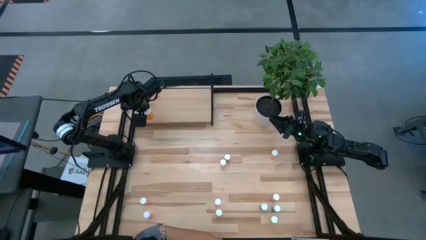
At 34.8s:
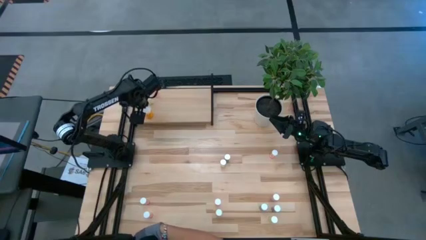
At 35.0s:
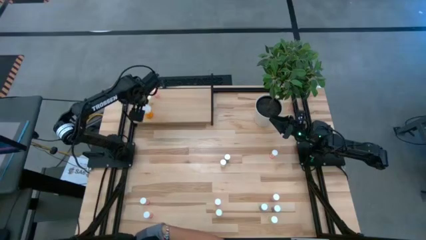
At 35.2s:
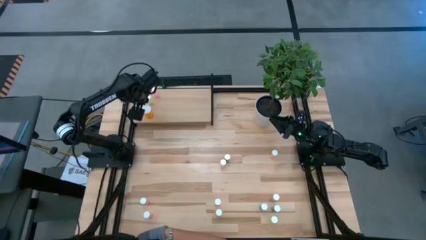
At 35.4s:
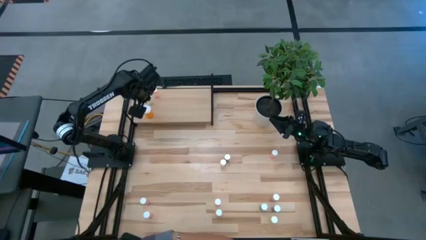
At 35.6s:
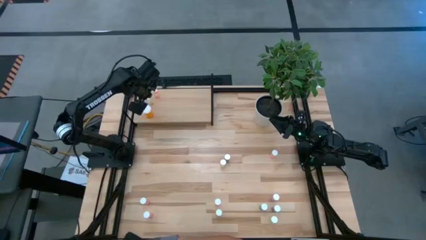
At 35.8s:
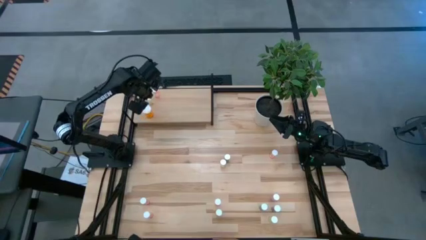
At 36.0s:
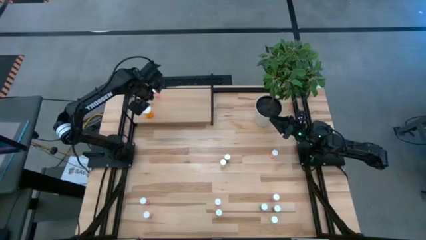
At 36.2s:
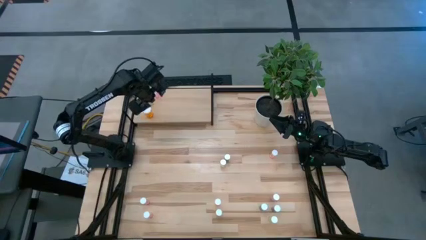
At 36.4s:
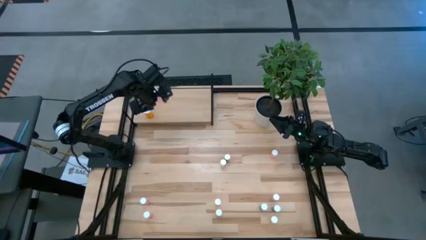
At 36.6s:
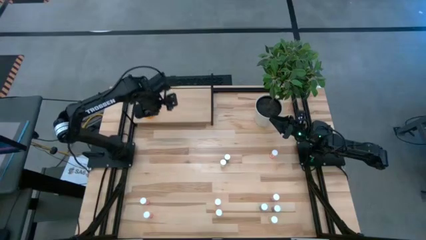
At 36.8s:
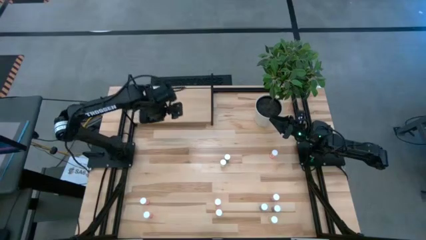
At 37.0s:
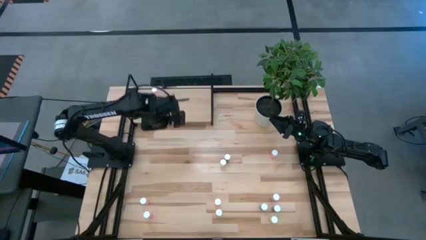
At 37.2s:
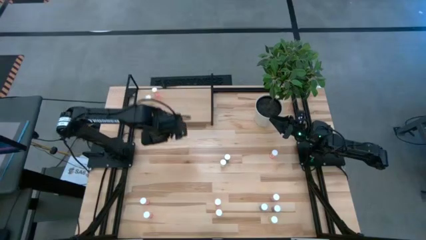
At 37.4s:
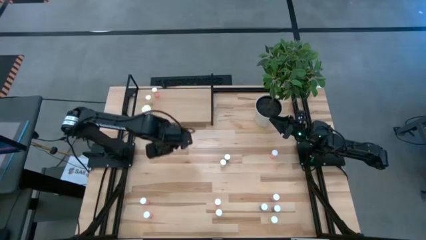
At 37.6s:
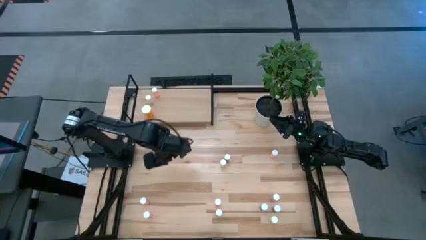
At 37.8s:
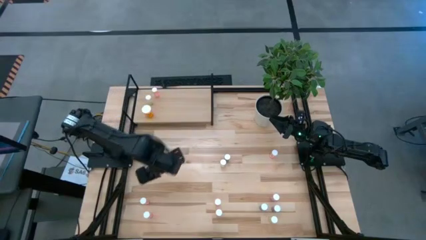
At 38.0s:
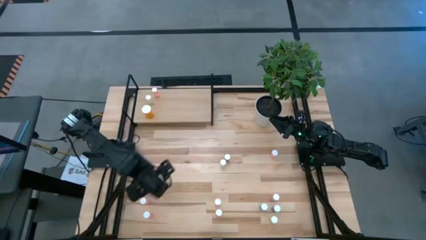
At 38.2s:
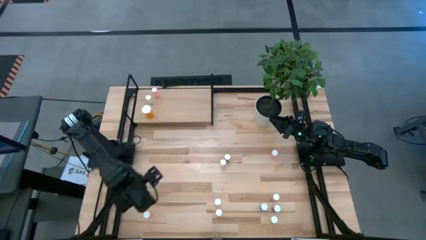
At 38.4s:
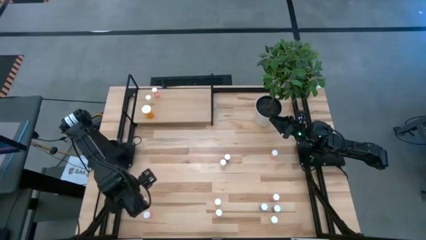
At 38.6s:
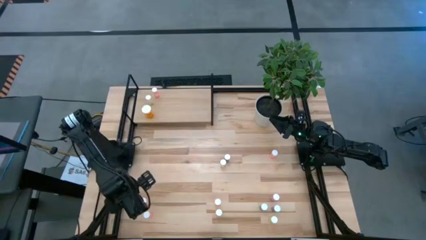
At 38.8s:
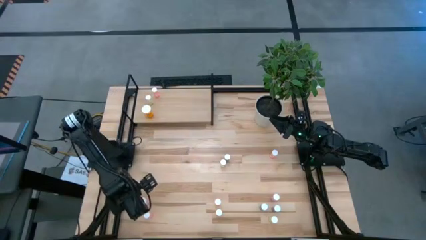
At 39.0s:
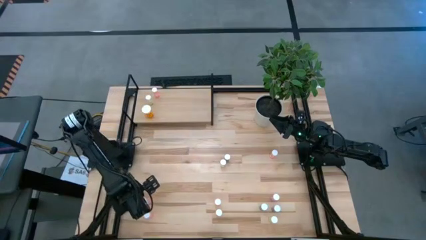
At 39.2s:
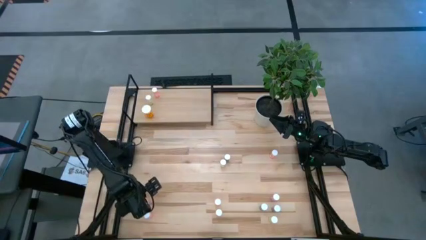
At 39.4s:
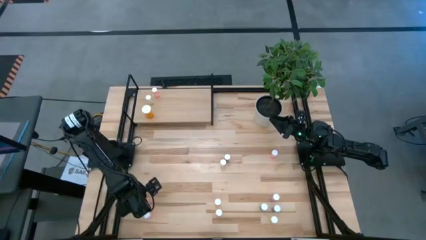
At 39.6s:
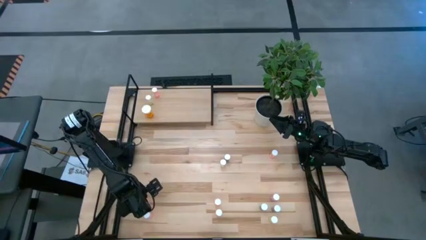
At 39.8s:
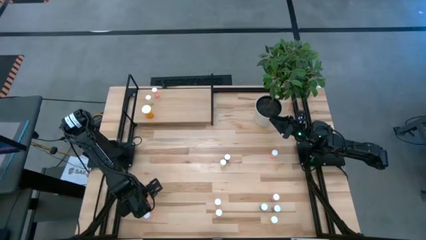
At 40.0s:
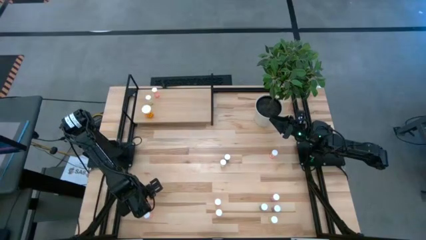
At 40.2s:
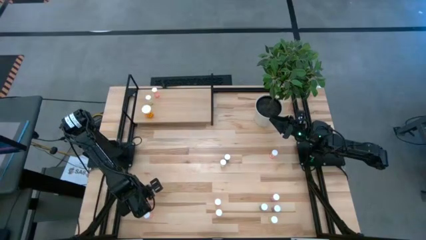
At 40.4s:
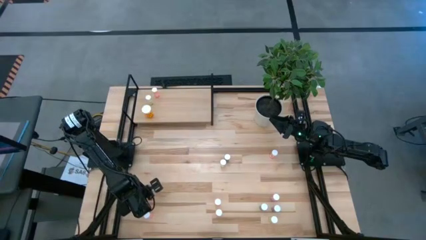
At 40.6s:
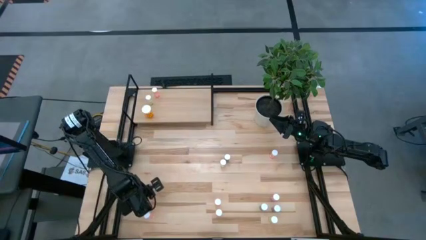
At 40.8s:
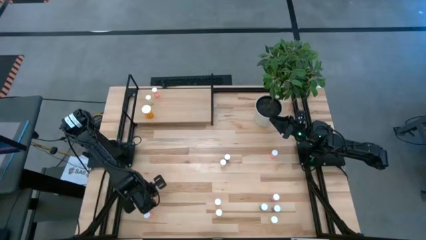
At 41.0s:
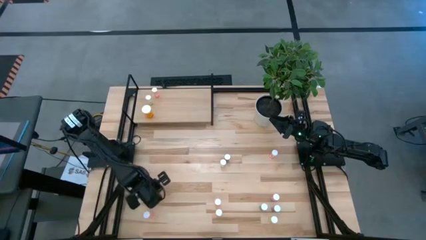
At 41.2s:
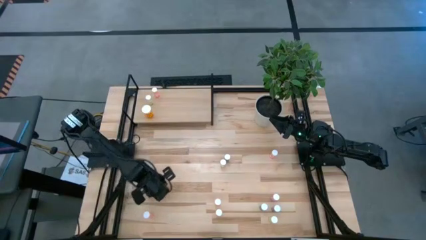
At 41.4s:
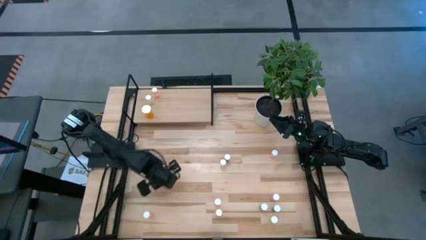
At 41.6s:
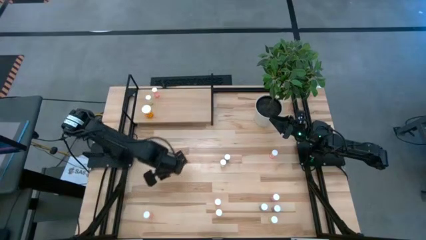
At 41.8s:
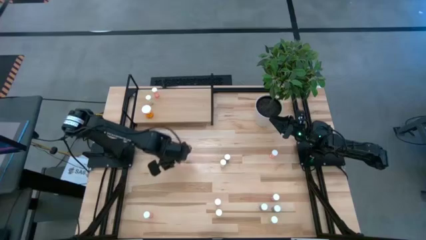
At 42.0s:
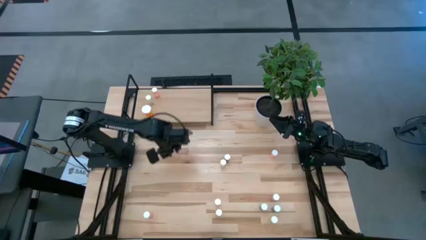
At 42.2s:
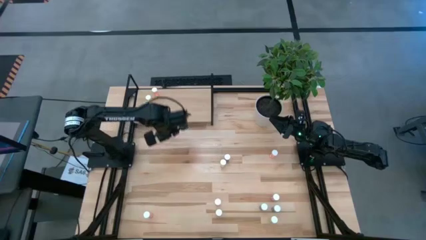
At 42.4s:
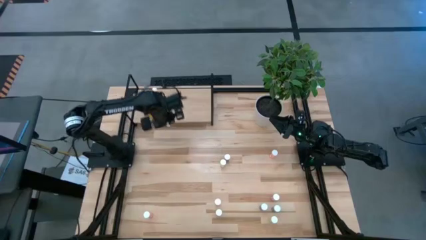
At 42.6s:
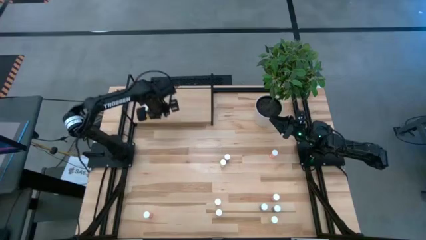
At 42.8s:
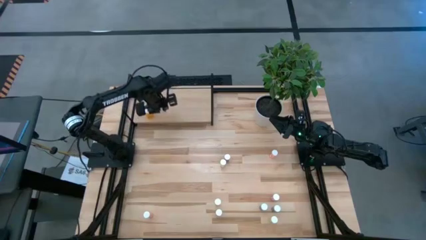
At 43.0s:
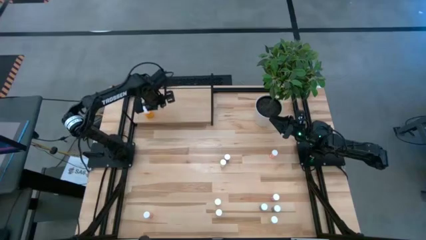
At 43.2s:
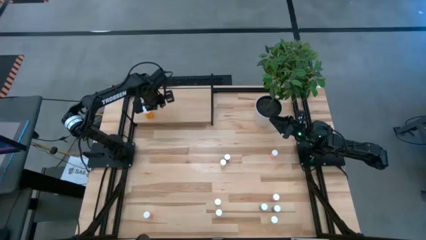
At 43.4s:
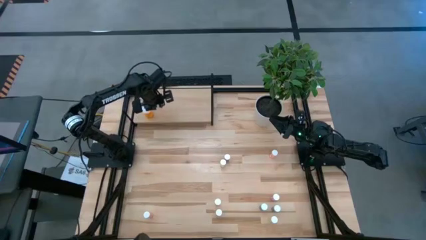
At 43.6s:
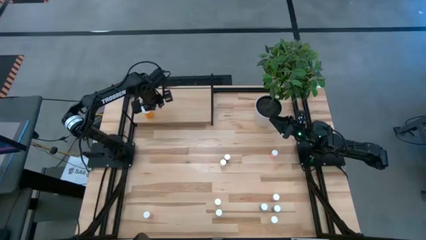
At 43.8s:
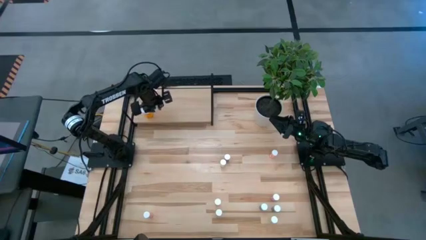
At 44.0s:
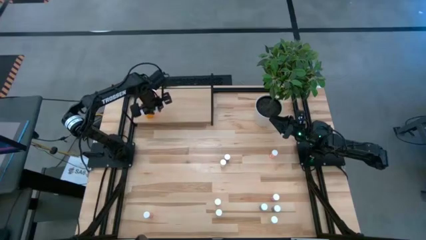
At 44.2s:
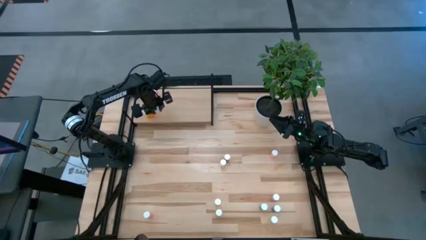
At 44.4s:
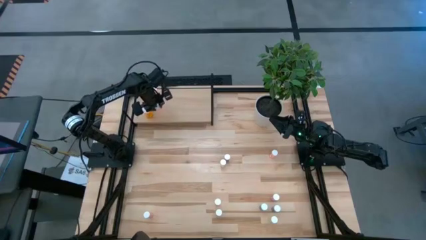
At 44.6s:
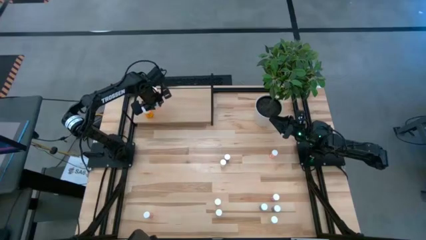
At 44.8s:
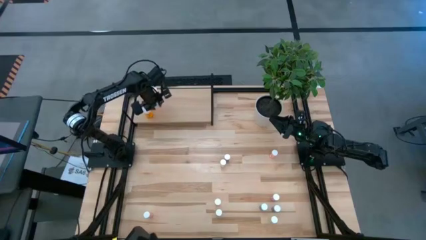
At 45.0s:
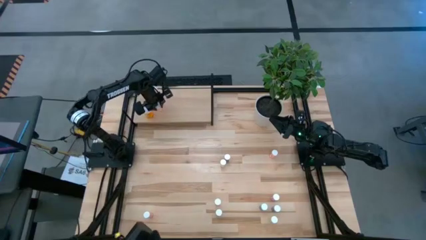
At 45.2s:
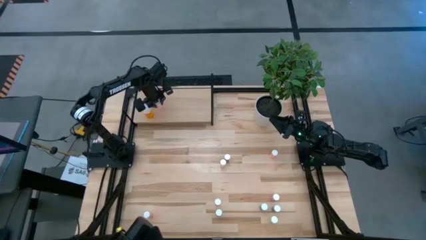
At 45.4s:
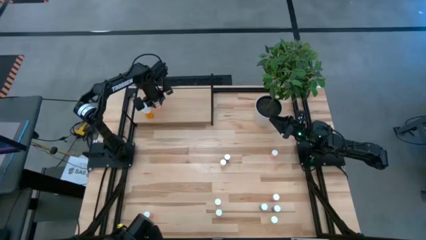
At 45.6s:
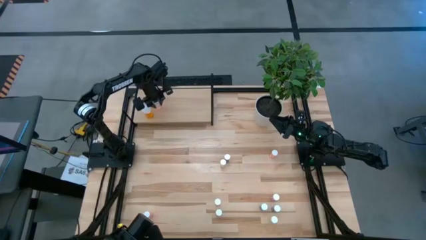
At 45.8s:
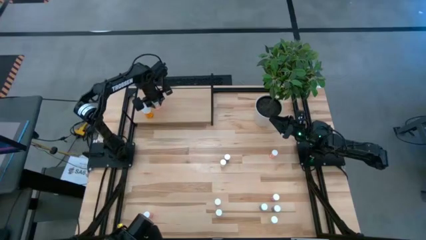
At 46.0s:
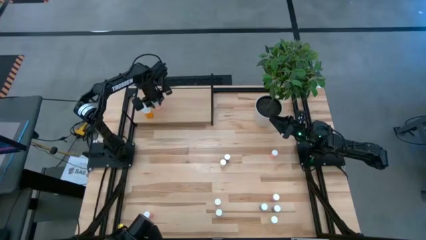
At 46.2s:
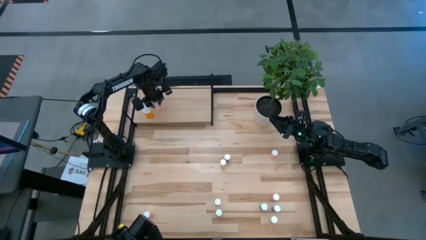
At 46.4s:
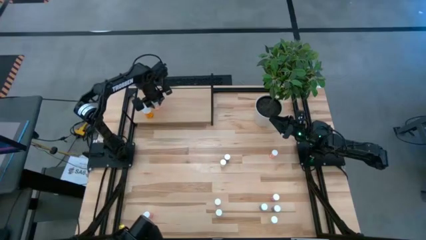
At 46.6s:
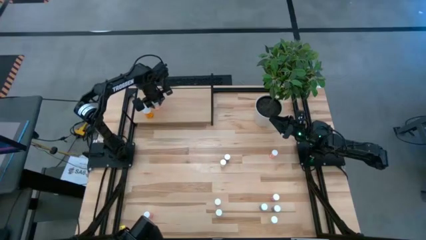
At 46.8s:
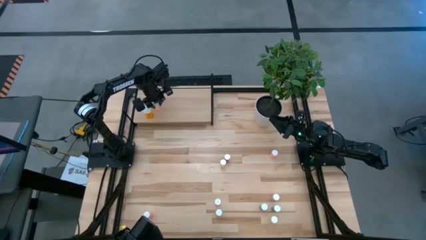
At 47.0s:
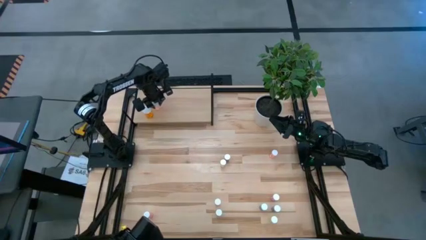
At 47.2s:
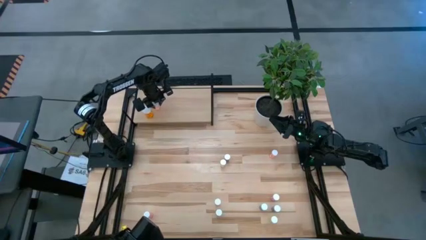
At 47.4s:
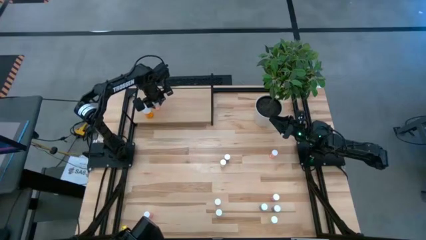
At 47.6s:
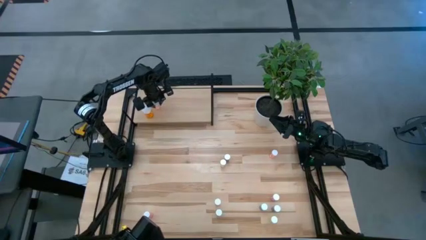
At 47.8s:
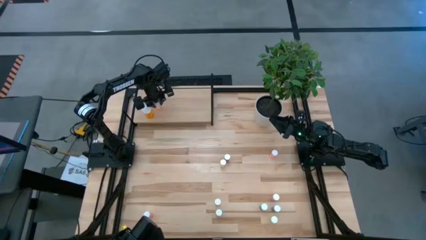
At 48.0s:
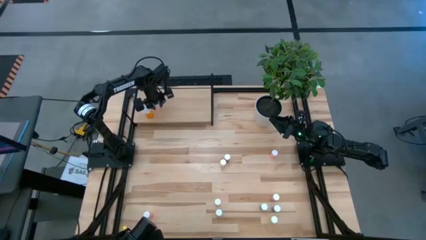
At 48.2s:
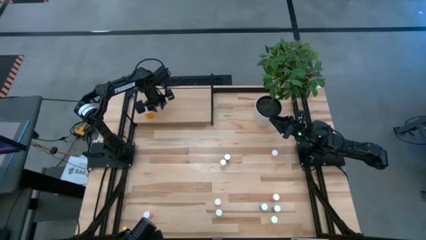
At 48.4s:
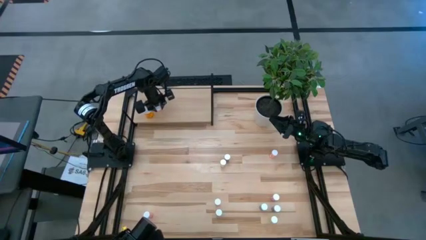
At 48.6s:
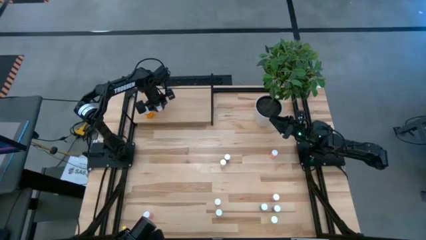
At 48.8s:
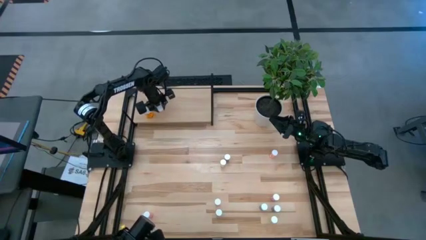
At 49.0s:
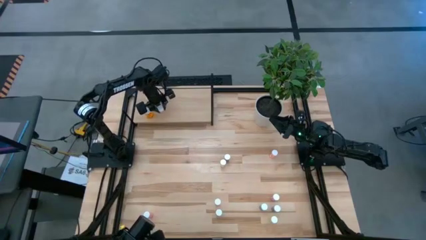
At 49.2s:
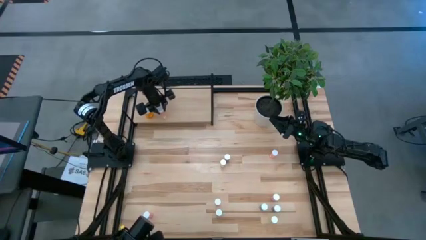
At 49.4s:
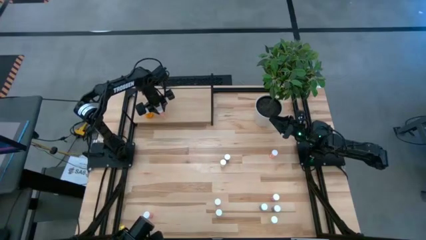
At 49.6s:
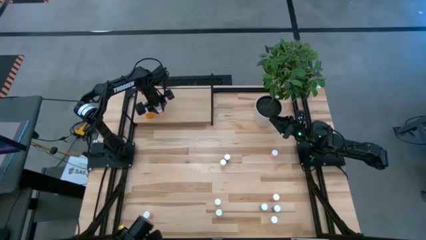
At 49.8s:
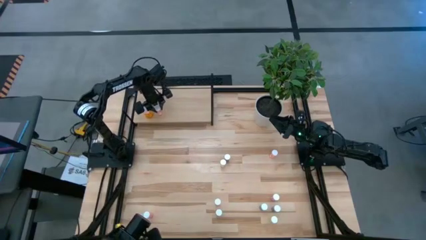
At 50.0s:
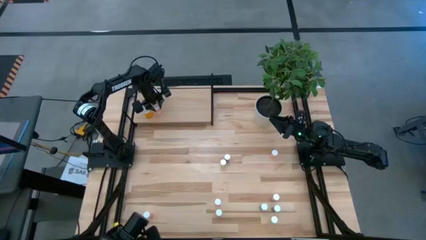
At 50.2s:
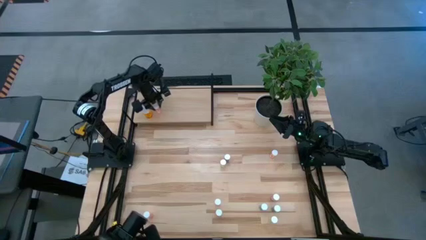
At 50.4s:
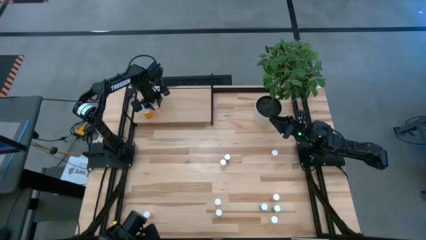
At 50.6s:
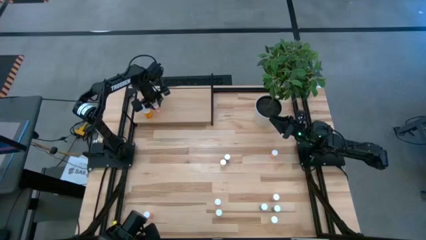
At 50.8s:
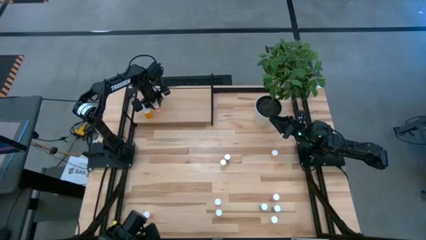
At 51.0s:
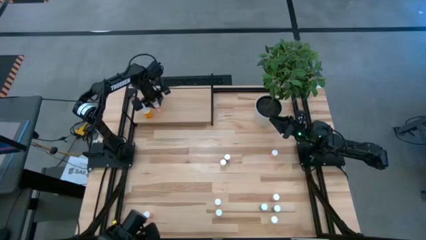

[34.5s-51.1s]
Task: Pick and place medicine bottles onto shelf by color
Put the pink pill bottle on the shelf
